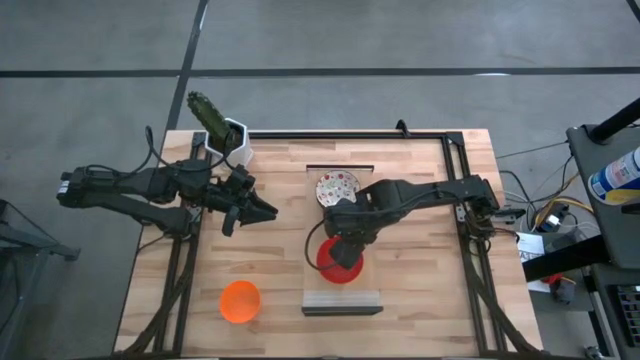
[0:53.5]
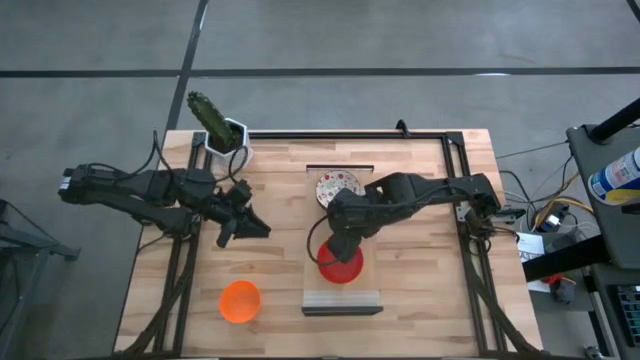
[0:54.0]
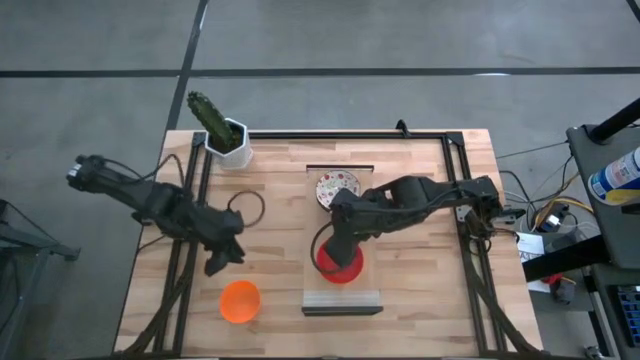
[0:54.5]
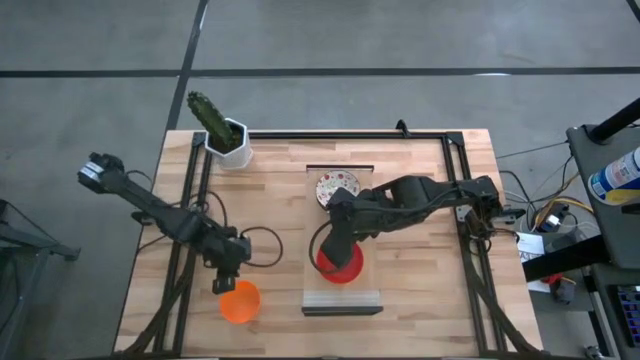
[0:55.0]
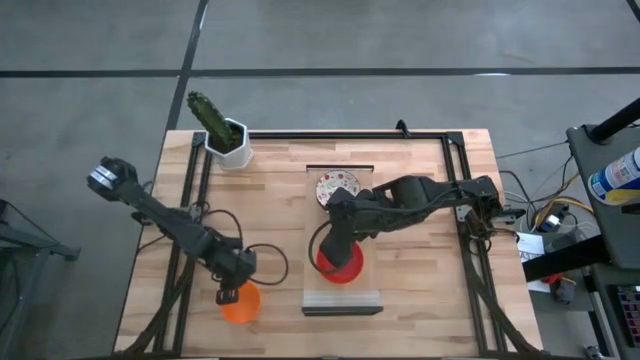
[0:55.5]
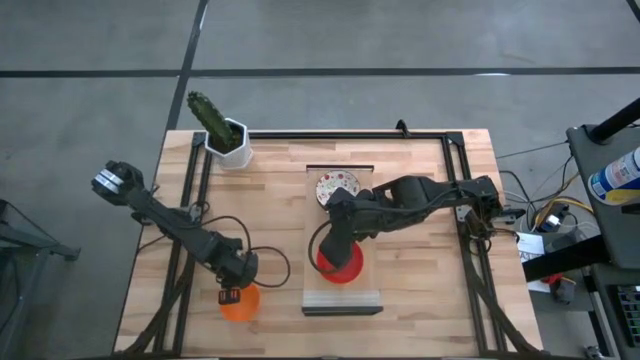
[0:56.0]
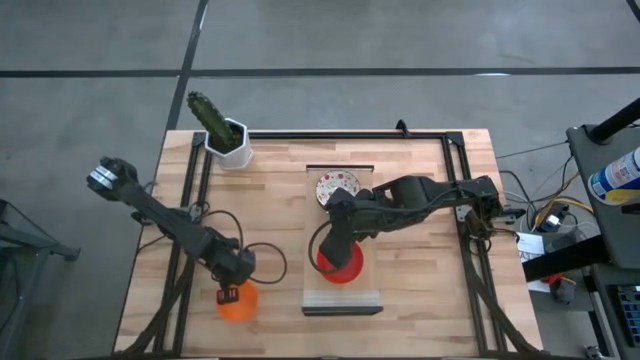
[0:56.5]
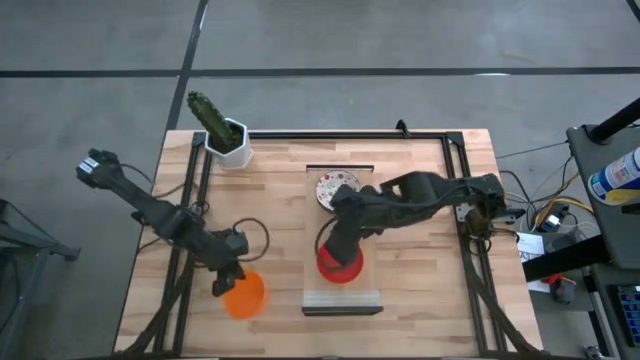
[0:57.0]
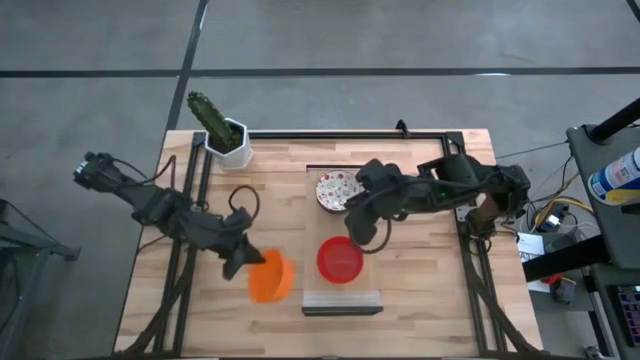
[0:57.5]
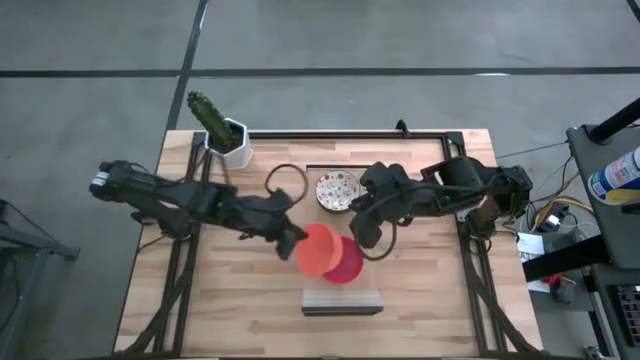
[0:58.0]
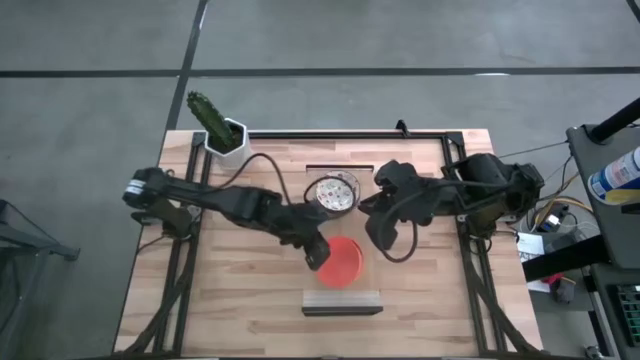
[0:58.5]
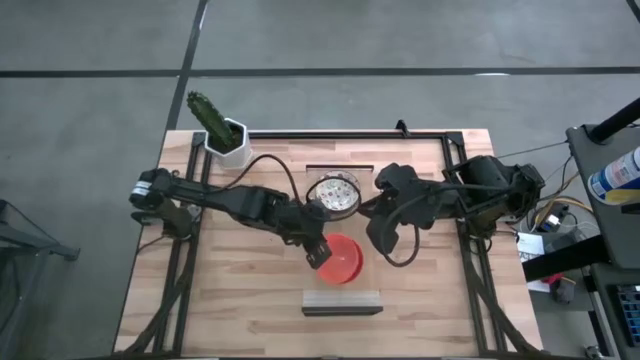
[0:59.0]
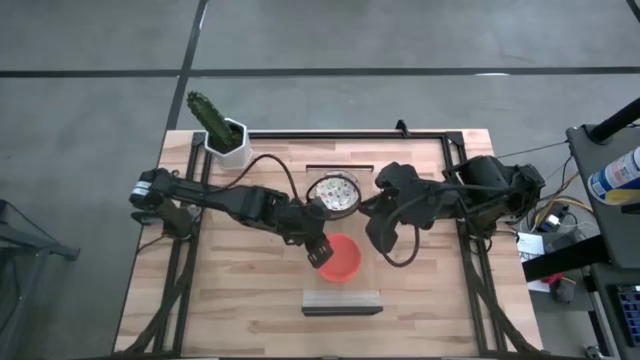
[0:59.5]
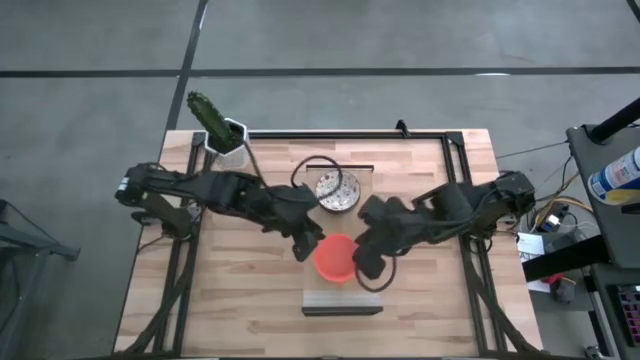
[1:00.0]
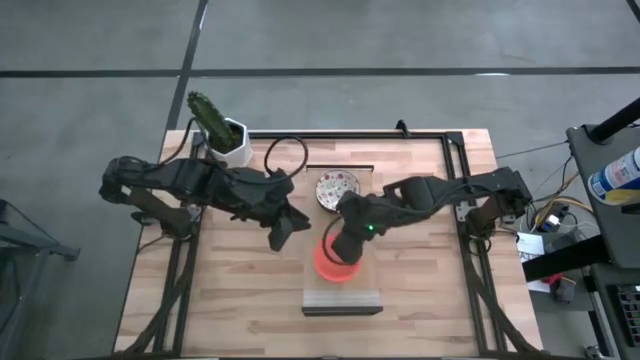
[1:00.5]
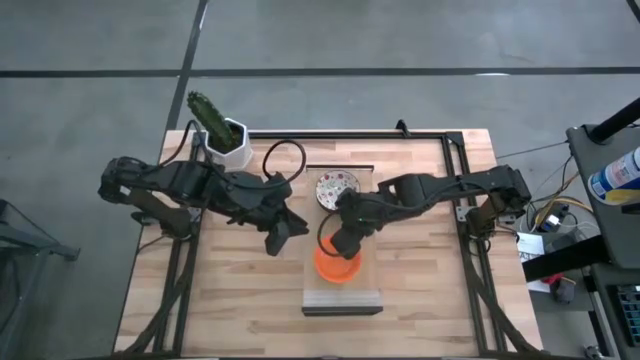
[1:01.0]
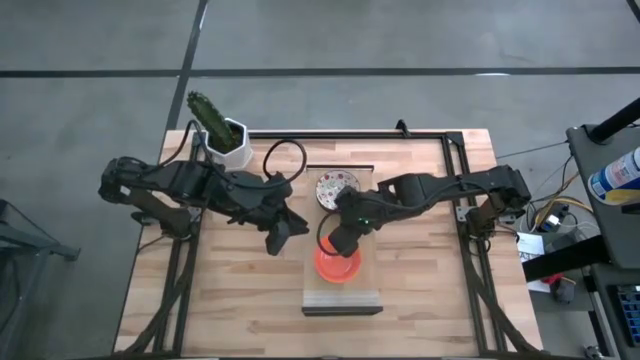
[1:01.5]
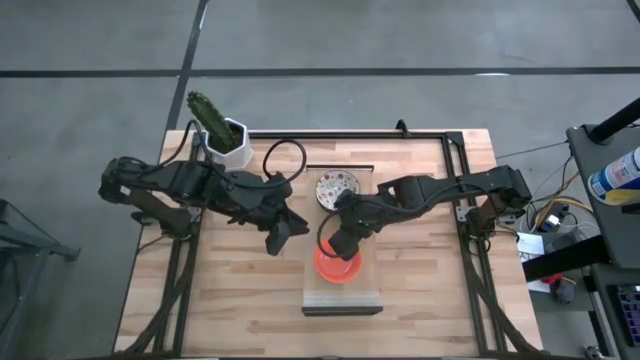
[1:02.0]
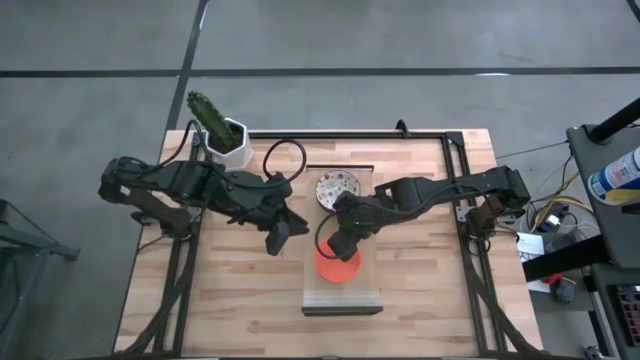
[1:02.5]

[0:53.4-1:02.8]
Task: Pick & Place Mini bowls
Stack the orange bowl on top of the red bowl on the shelf

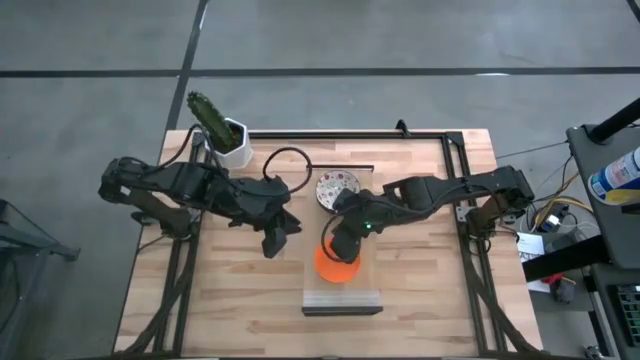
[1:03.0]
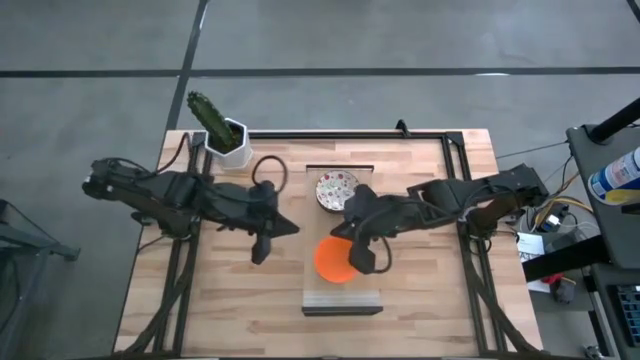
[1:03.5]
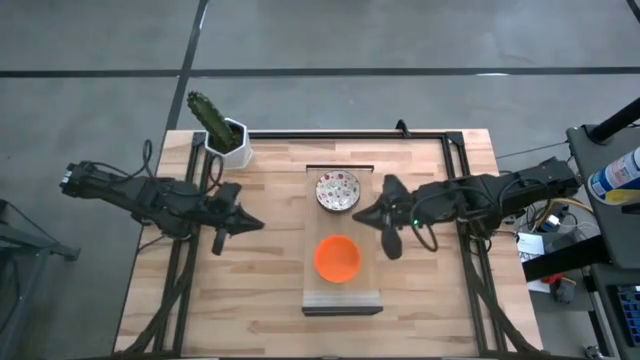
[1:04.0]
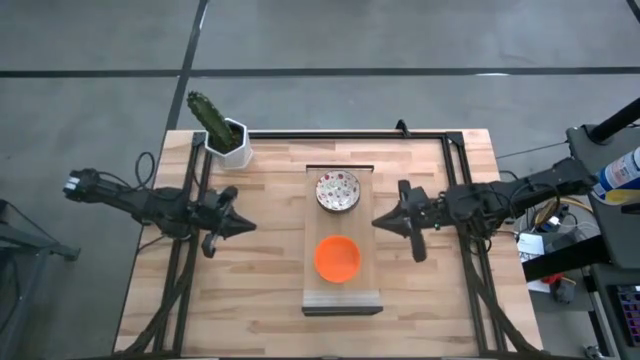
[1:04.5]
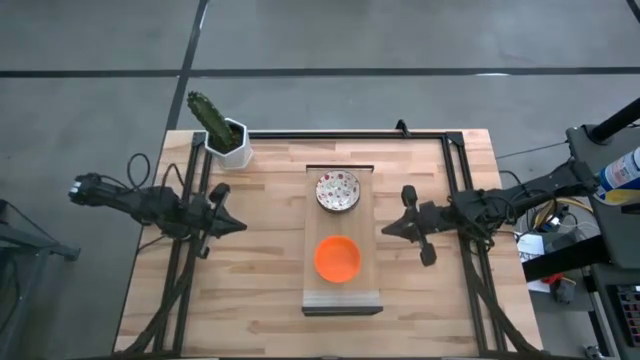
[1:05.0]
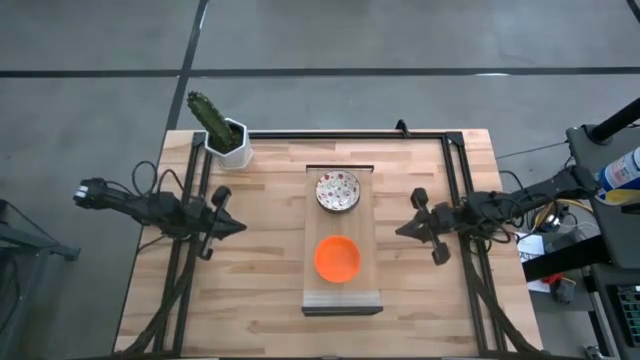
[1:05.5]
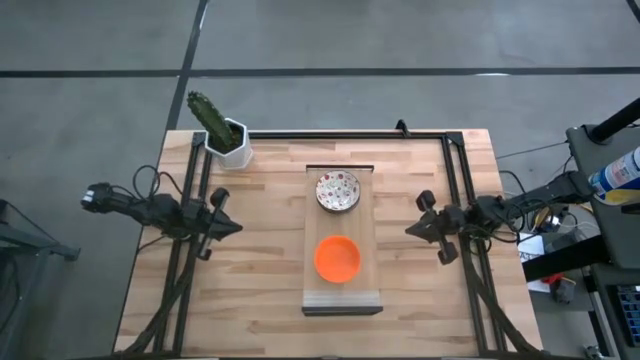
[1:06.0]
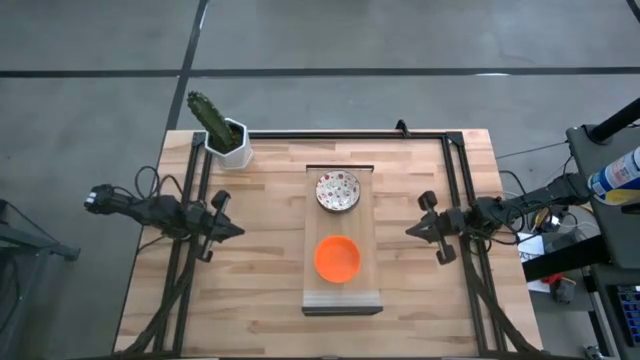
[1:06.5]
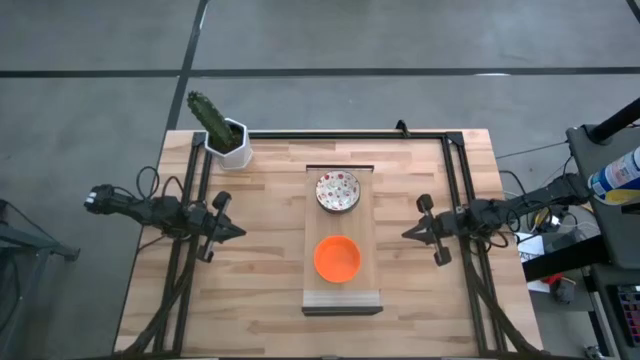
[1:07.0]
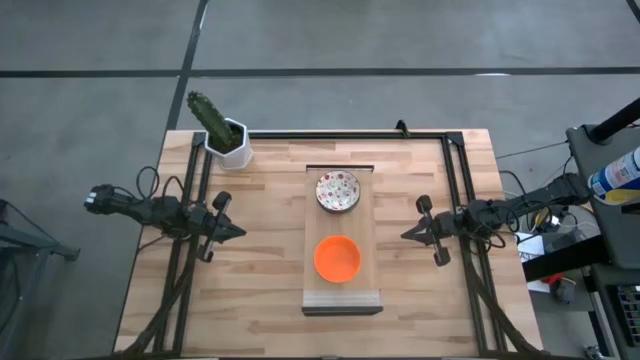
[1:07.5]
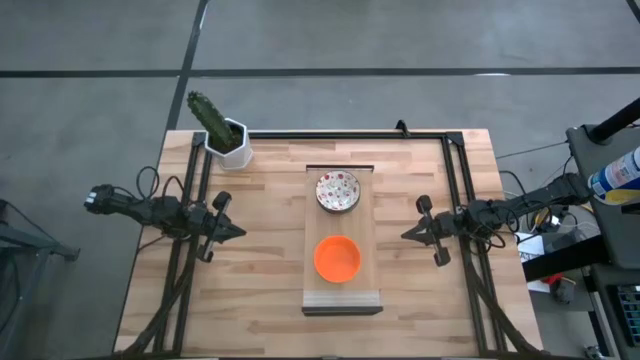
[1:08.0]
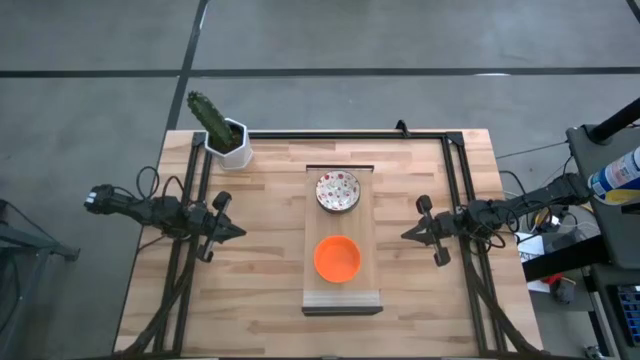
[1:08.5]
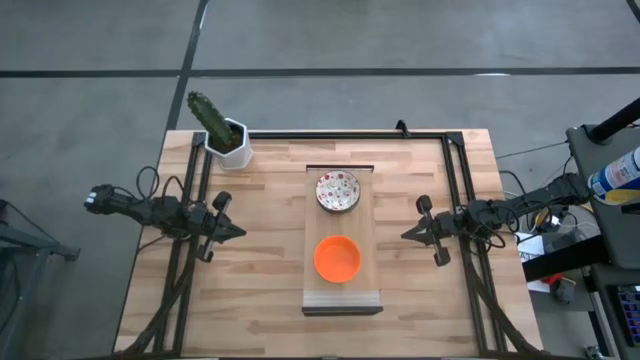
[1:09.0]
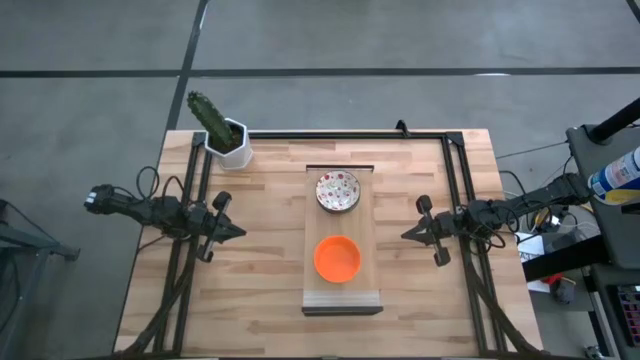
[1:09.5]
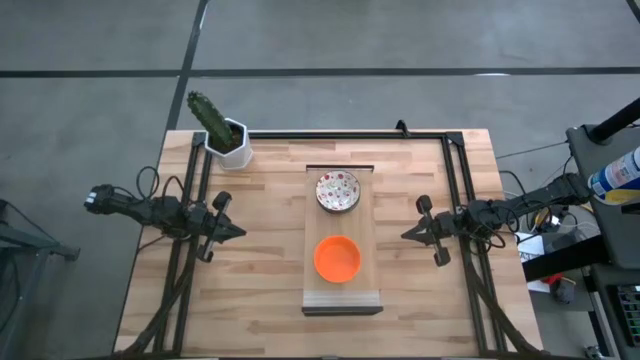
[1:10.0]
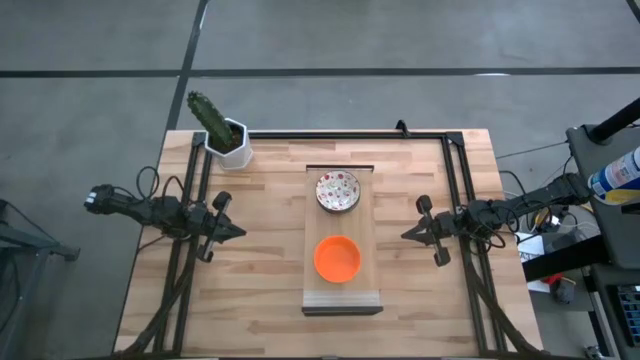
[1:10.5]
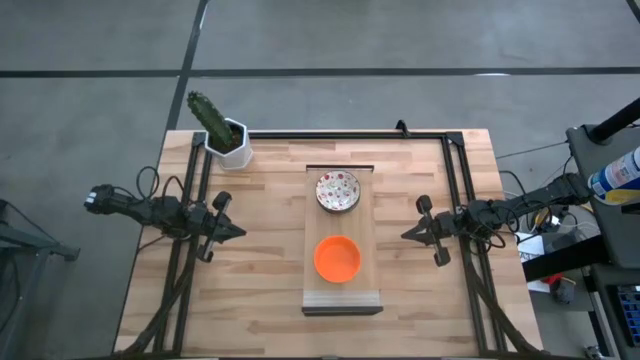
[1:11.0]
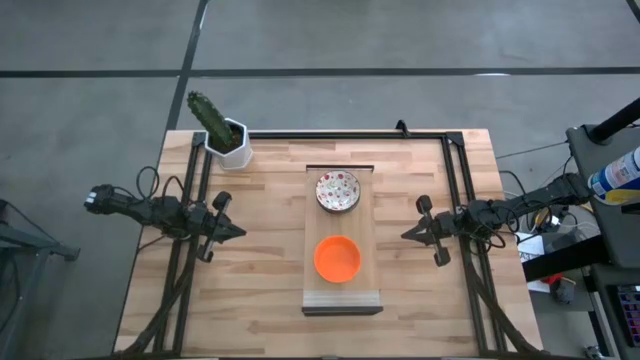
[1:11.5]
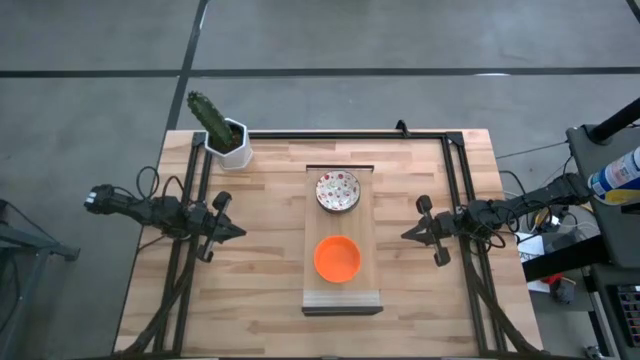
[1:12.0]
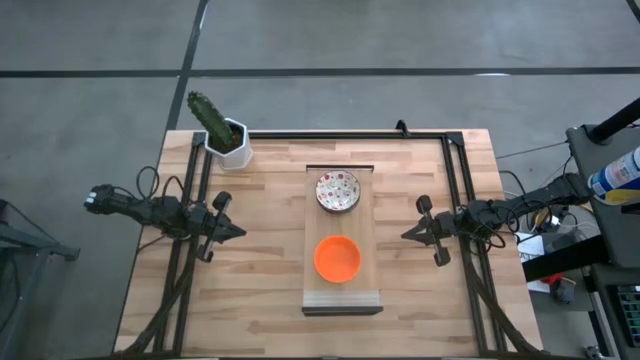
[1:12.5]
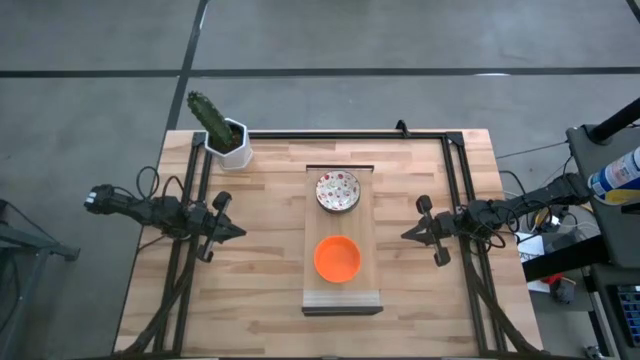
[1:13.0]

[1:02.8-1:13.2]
Return to Home Position

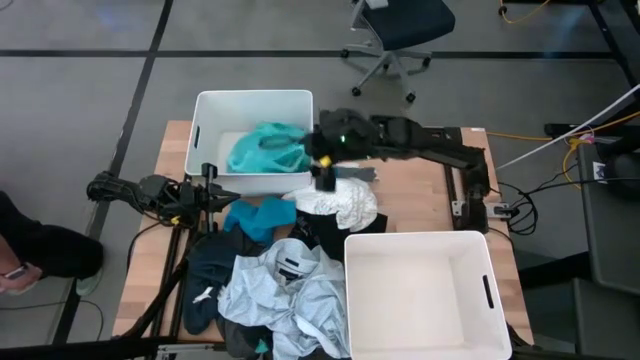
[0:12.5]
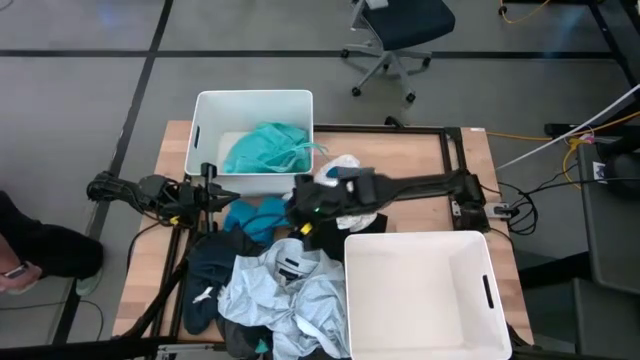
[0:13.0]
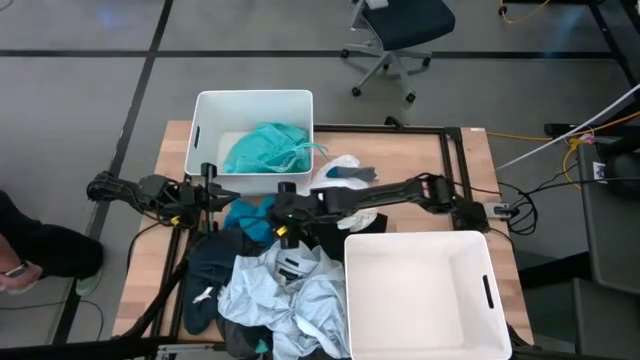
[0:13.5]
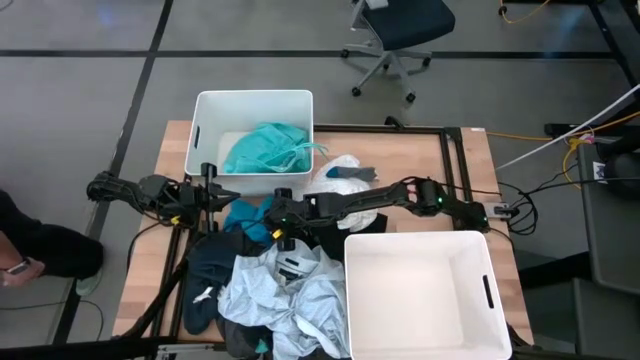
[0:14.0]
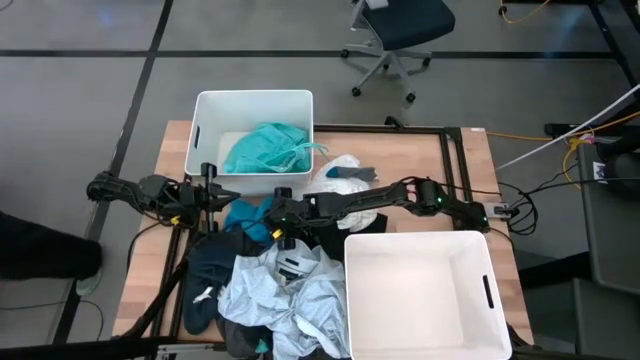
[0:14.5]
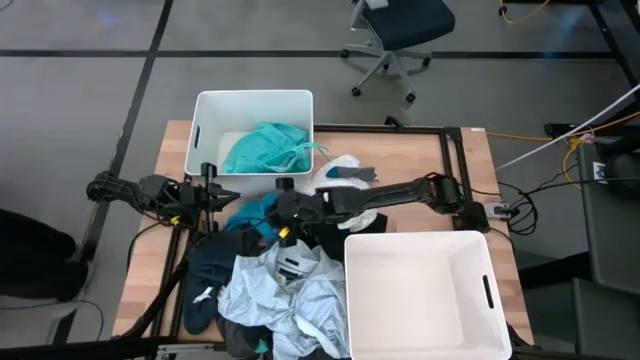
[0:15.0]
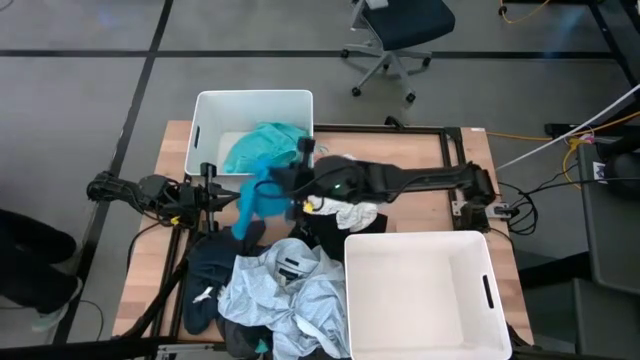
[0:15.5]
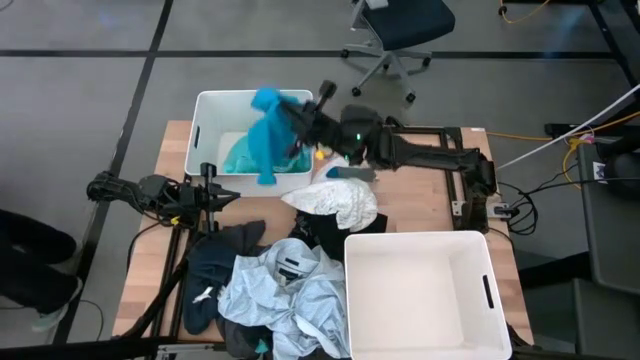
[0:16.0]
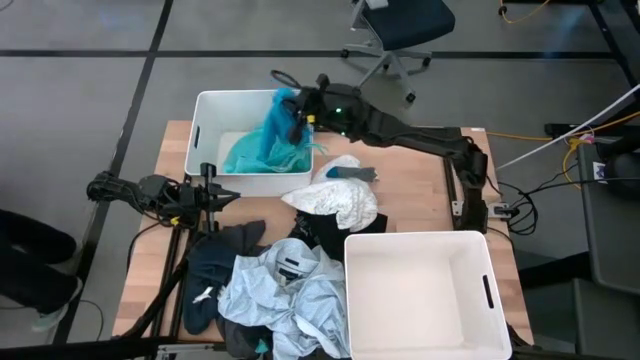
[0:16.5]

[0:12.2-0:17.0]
Task: Sort clothes
Put the blue shorts into the top white laundry bin
